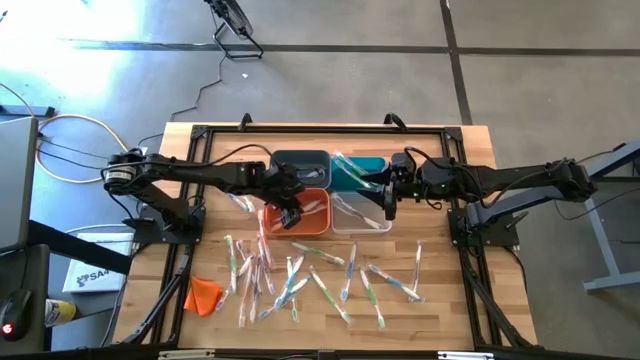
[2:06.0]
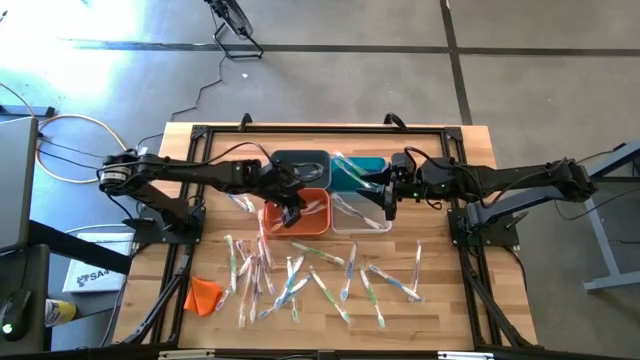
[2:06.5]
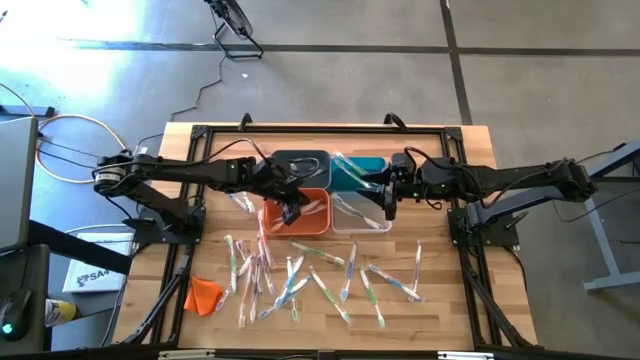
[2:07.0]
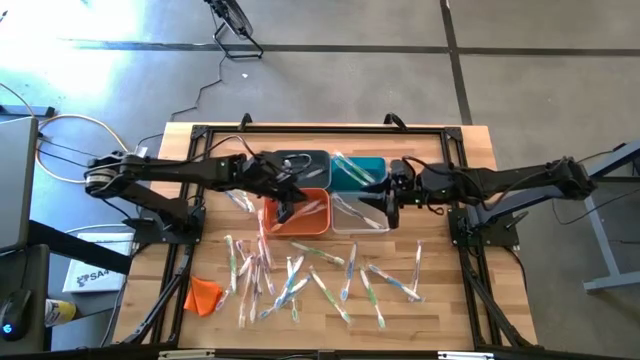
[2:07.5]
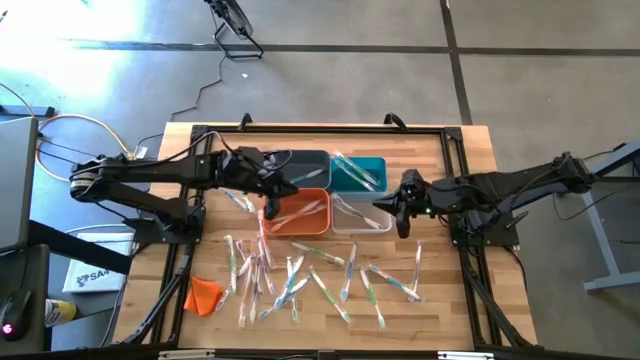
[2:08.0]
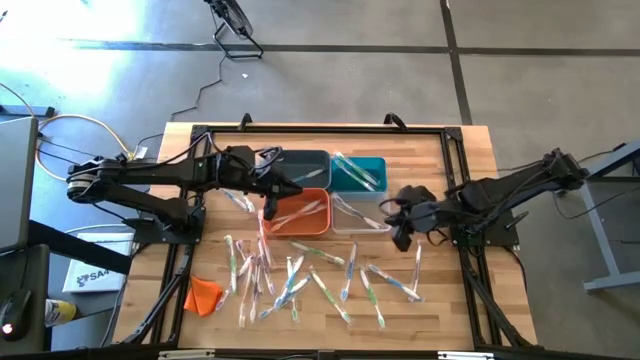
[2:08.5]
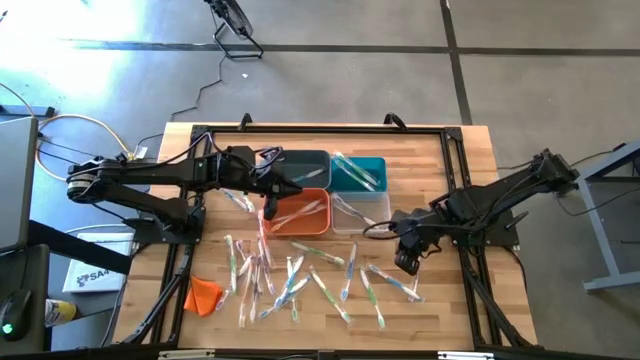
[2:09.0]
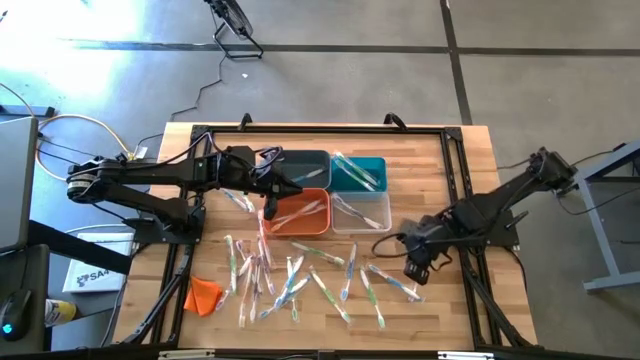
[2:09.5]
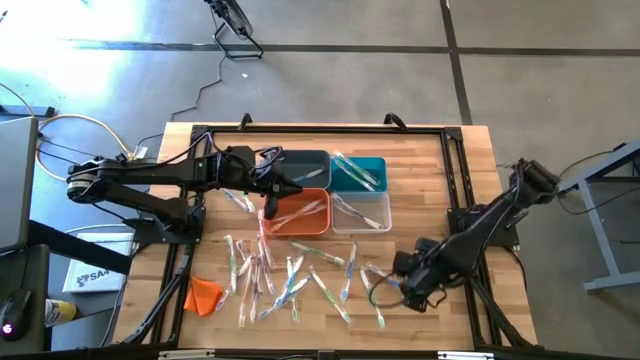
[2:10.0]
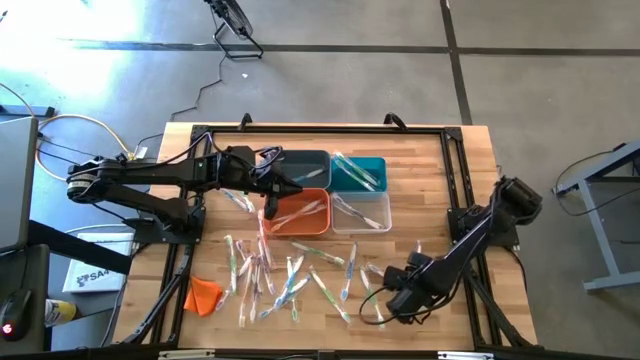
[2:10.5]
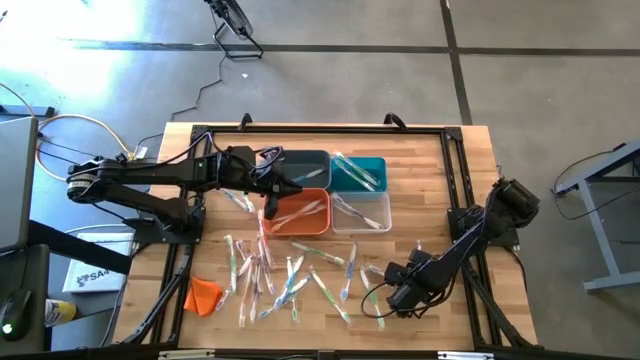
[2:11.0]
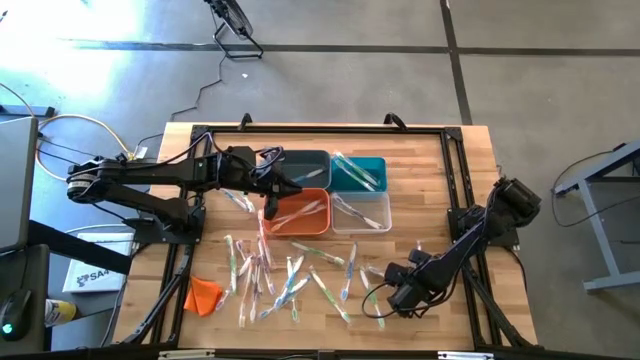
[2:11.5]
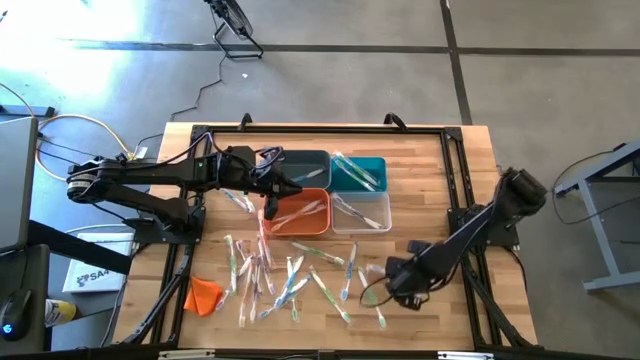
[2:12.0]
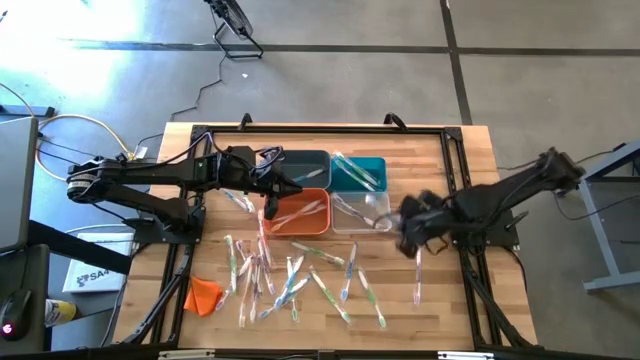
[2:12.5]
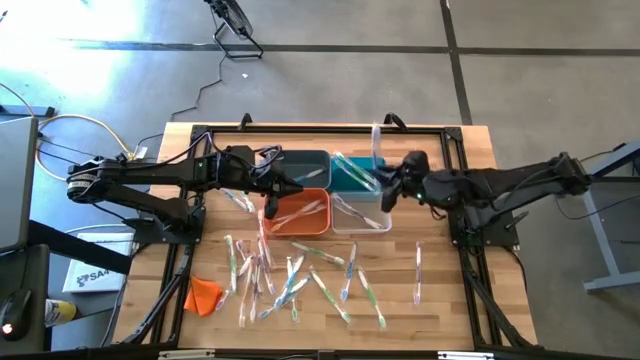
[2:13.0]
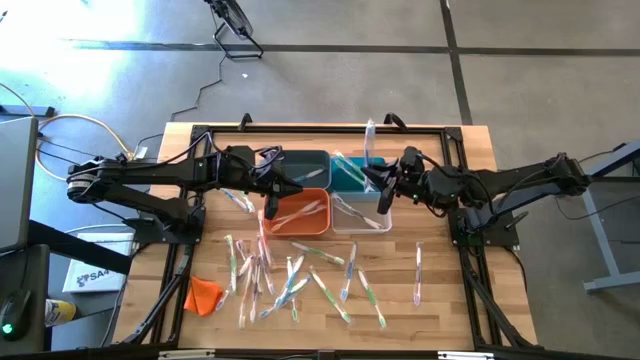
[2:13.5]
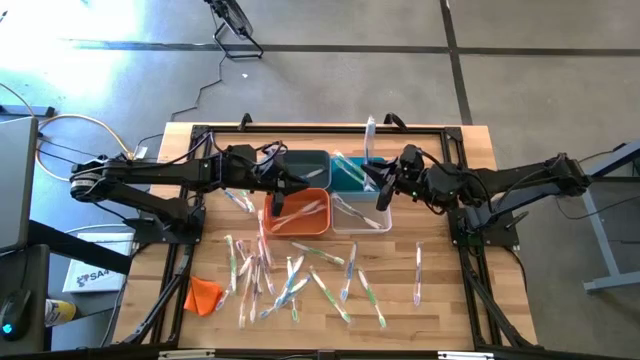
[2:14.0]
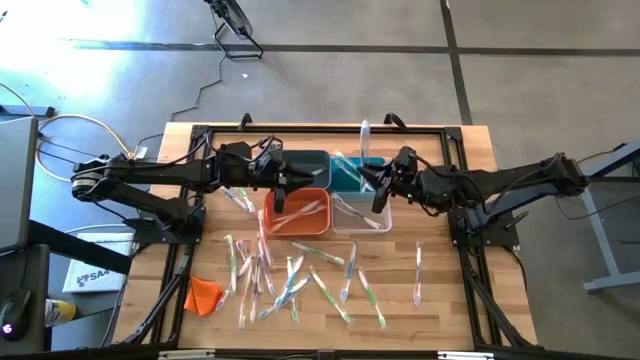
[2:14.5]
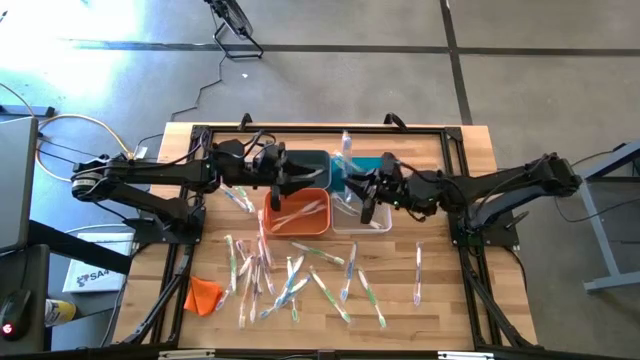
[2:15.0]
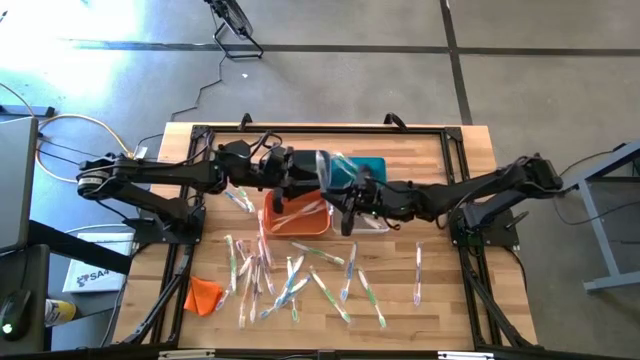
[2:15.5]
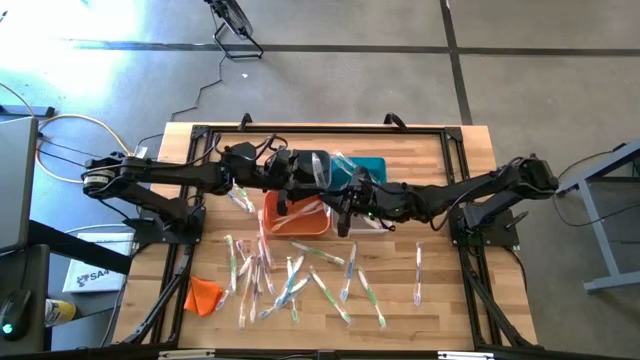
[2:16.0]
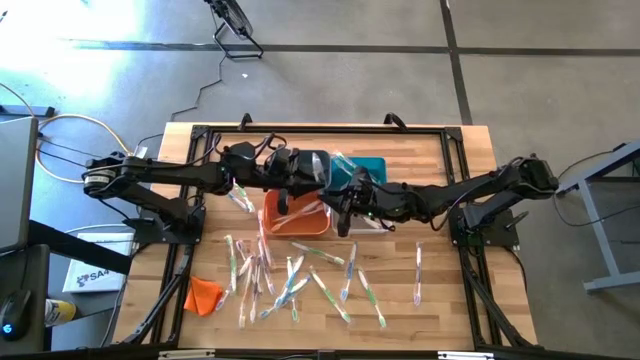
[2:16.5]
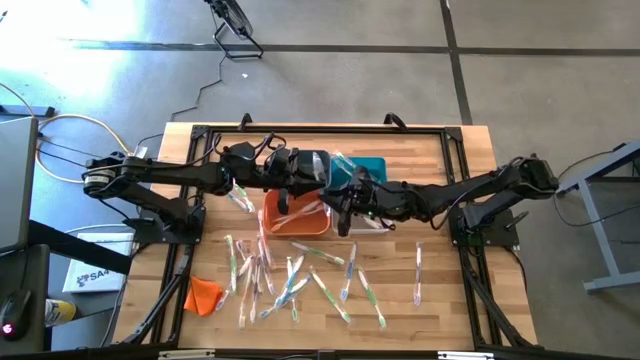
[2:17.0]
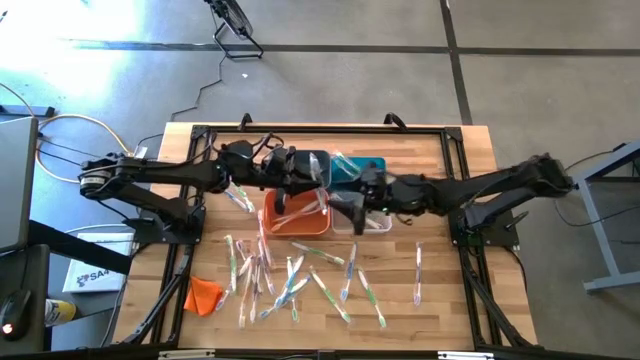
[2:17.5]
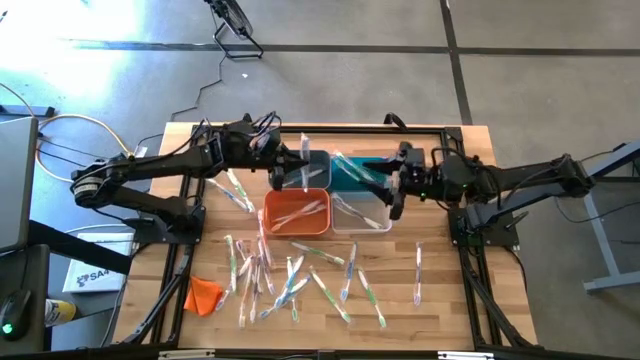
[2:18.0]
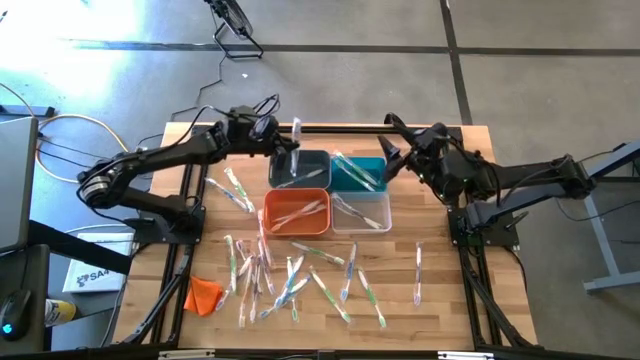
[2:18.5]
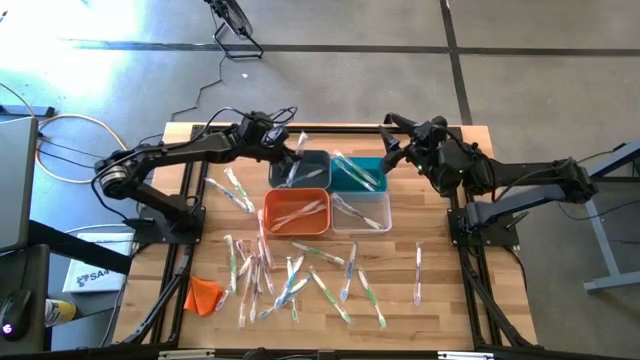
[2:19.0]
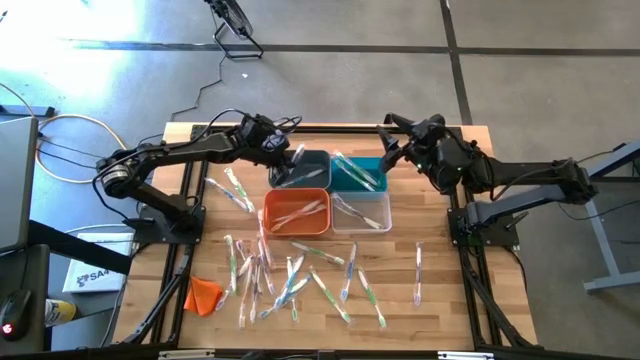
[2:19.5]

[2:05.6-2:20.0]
Task: Pick & Place Toothbrushes
Put the blue toothbrush into the left blue bin

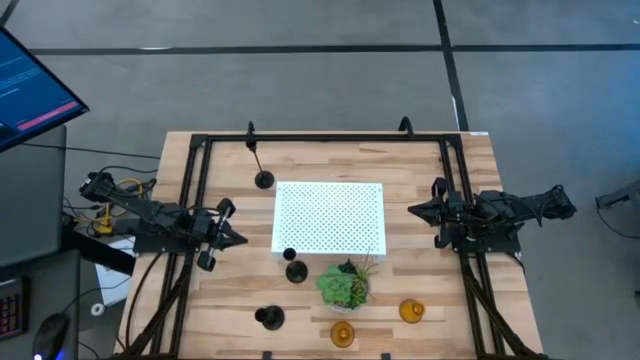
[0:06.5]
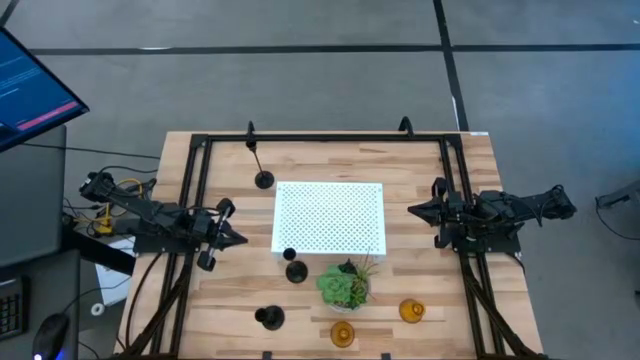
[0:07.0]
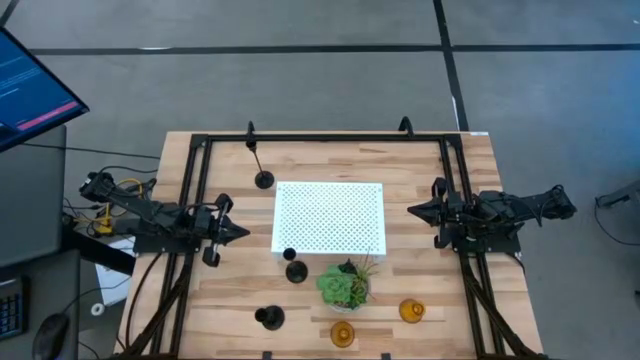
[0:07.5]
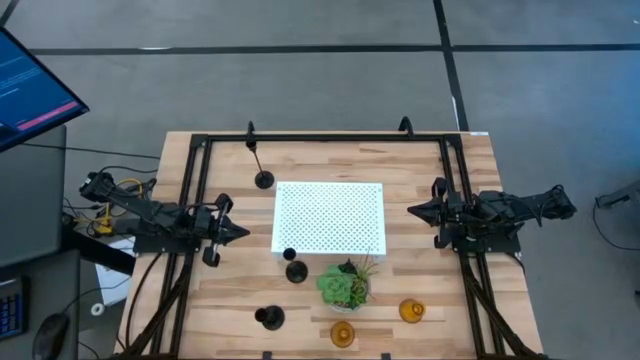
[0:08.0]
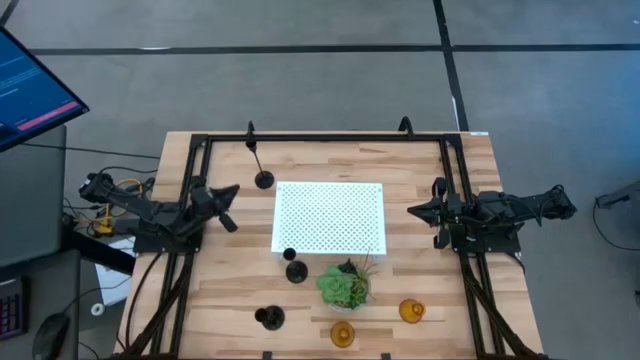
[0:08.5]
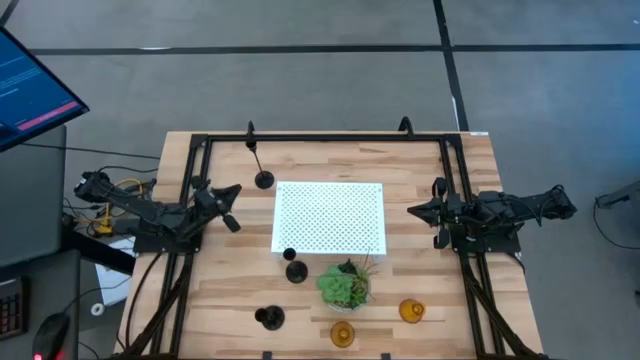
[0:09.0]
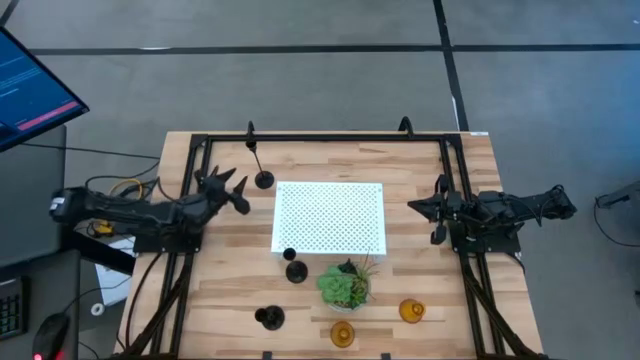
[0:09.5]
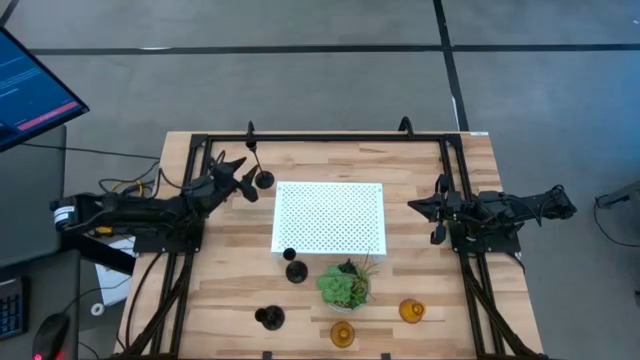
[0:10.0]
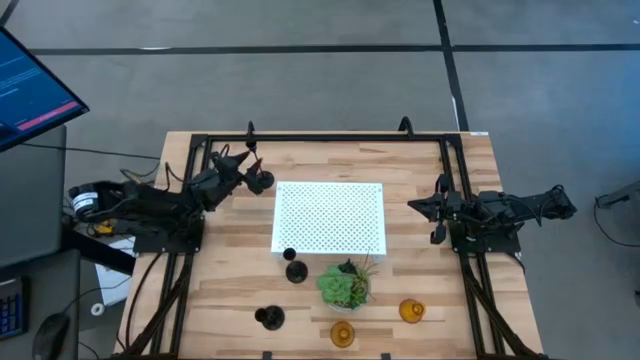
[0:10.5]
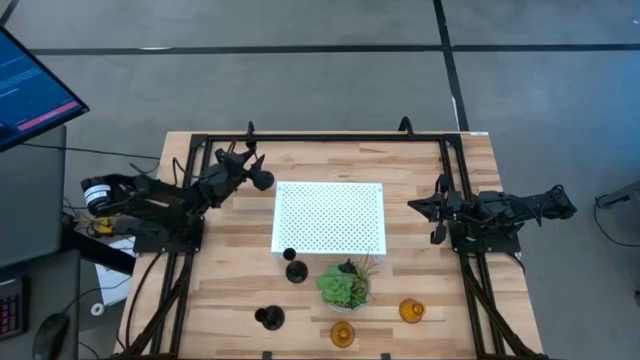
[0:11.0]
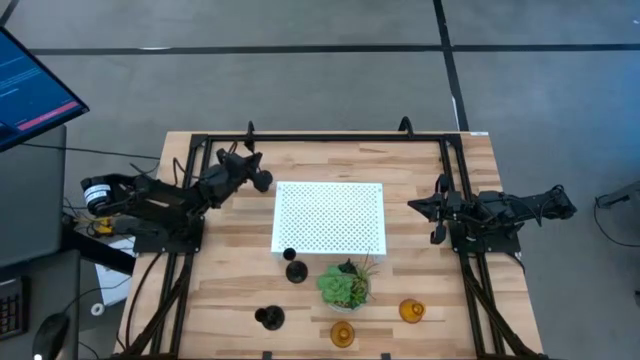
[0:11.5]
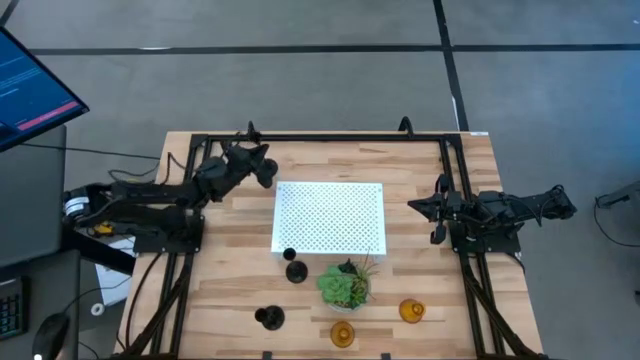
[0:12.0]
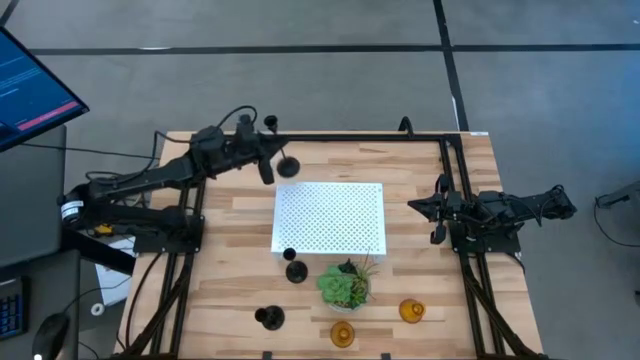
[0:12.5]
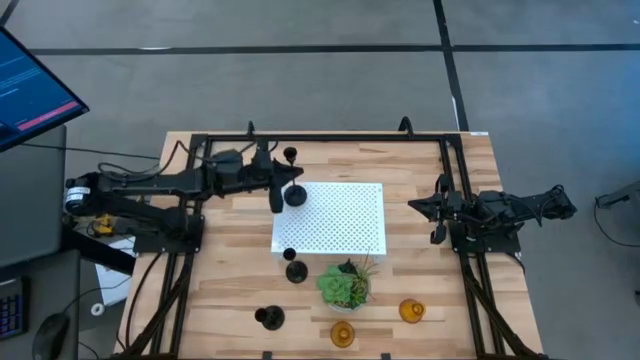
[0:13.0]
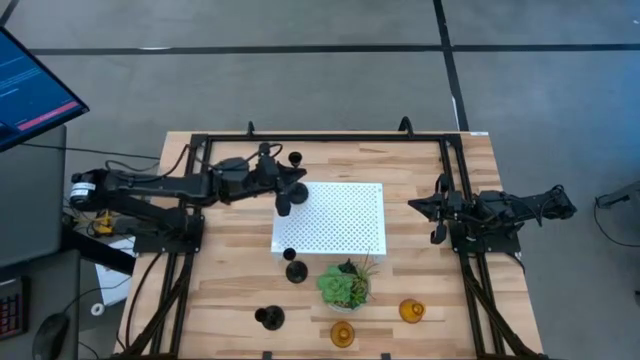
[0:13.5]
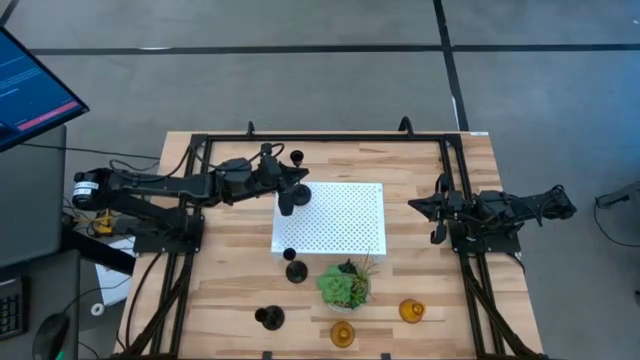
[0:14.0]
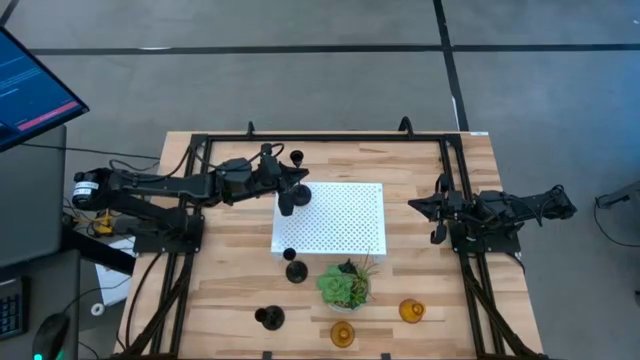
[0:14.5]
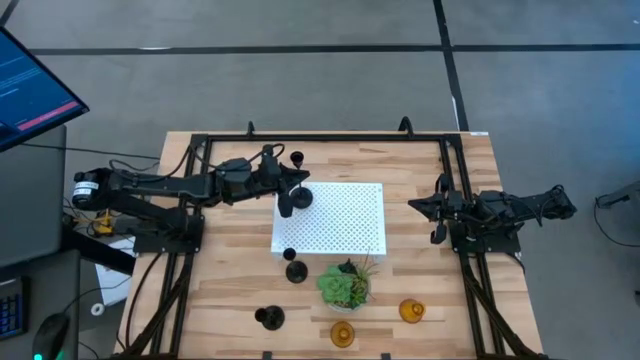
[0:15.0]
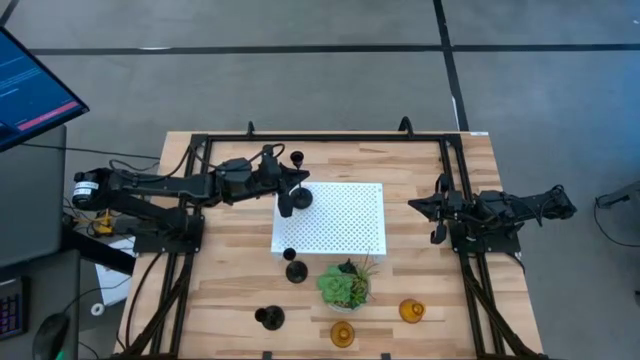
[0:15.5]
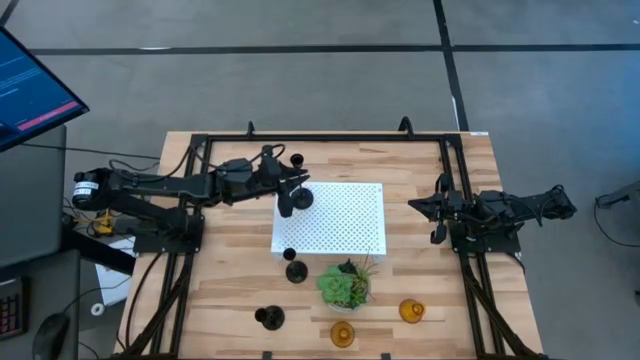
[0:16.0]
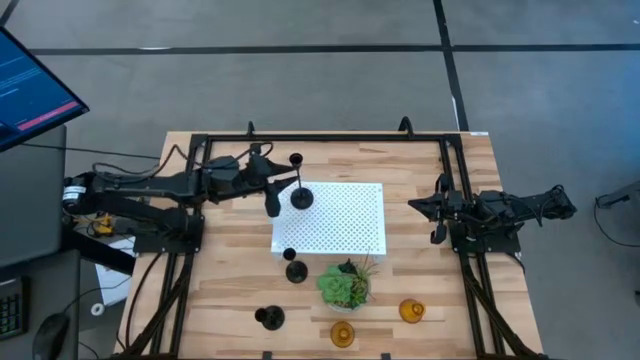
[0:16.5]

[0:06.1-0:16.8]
Task: Pick & Place candle stick holders
Put the top black candle holder on the shelf
